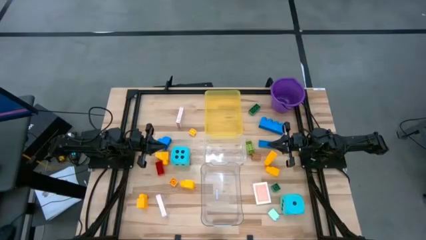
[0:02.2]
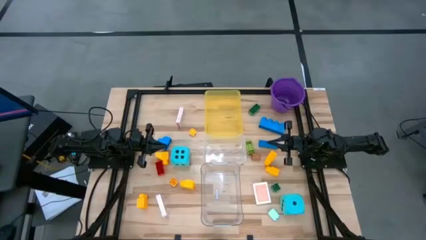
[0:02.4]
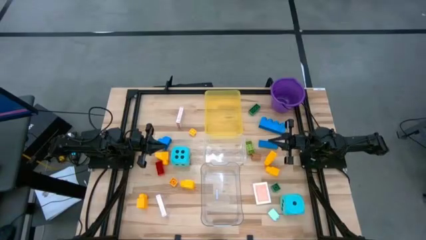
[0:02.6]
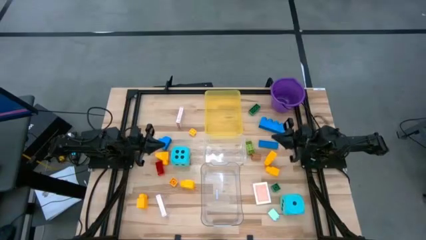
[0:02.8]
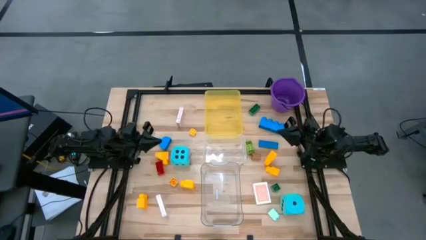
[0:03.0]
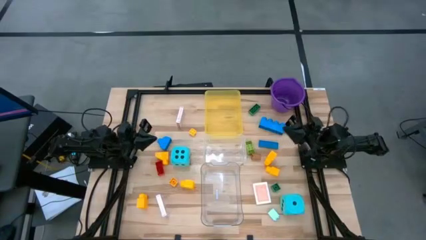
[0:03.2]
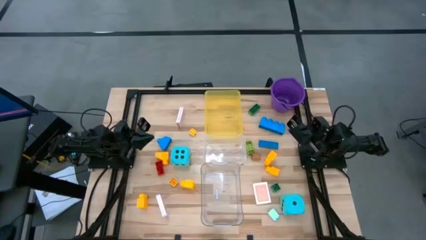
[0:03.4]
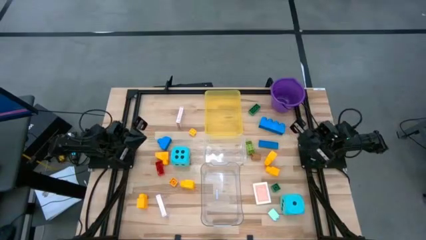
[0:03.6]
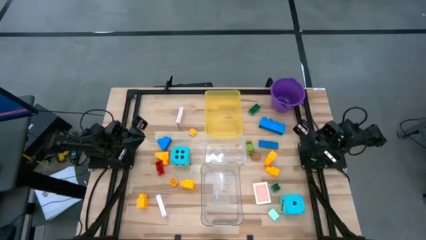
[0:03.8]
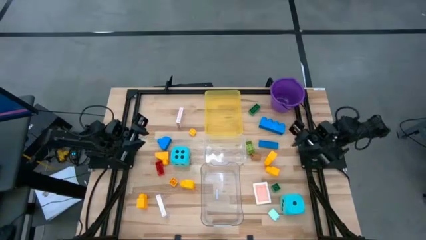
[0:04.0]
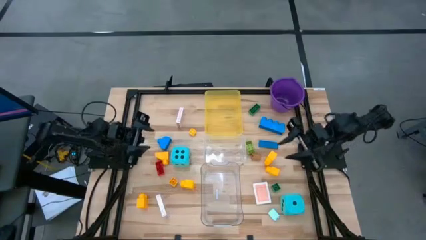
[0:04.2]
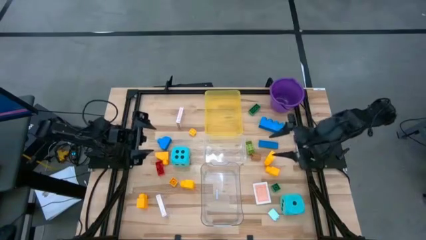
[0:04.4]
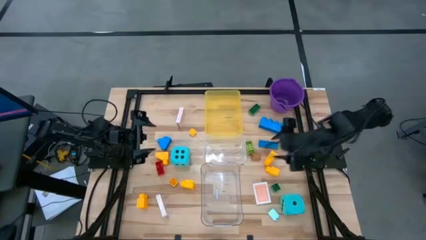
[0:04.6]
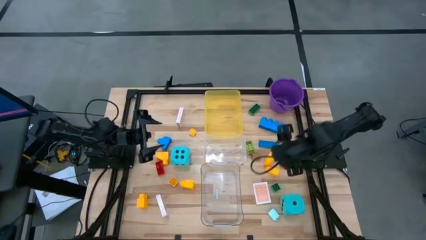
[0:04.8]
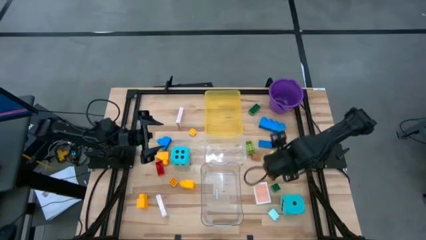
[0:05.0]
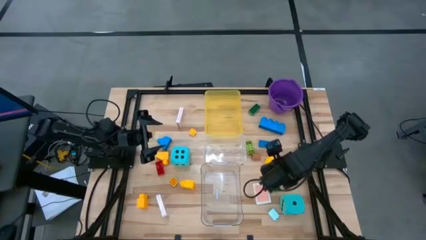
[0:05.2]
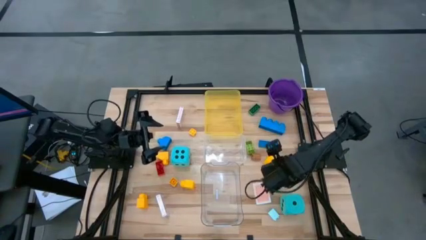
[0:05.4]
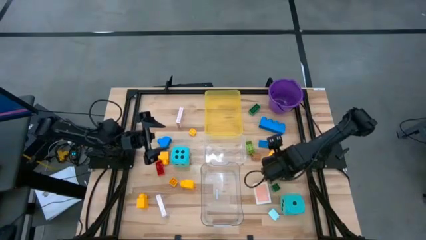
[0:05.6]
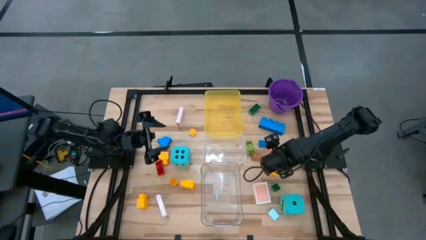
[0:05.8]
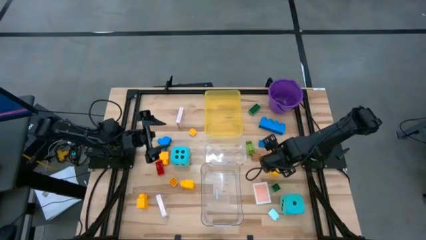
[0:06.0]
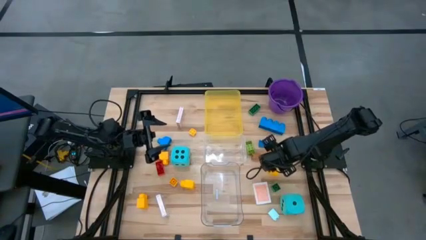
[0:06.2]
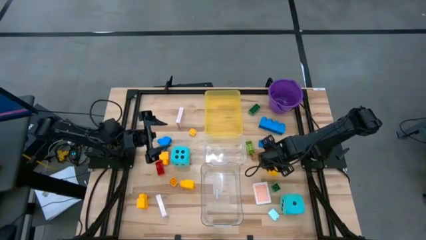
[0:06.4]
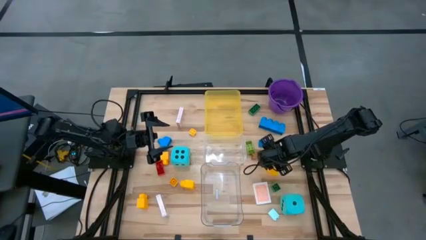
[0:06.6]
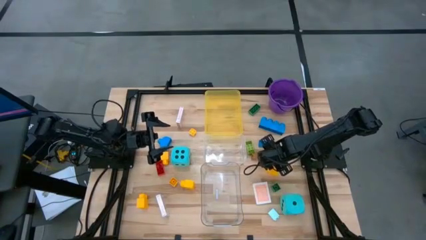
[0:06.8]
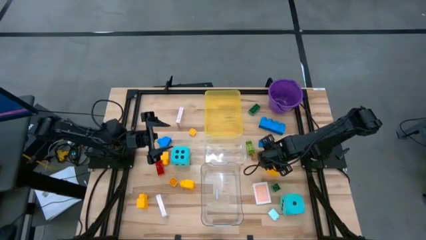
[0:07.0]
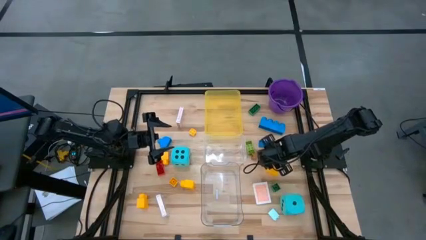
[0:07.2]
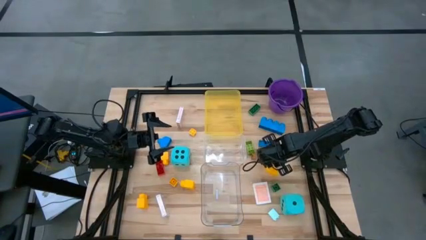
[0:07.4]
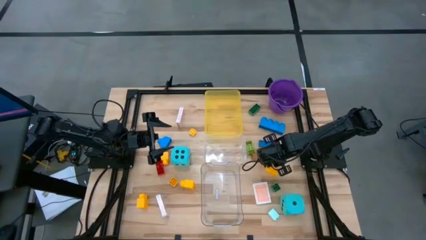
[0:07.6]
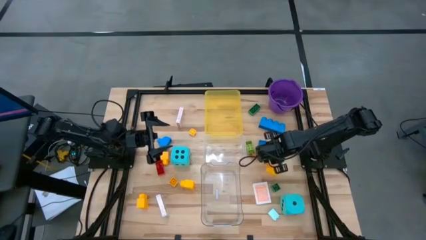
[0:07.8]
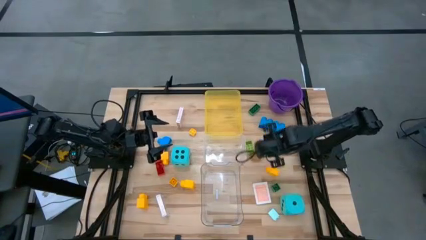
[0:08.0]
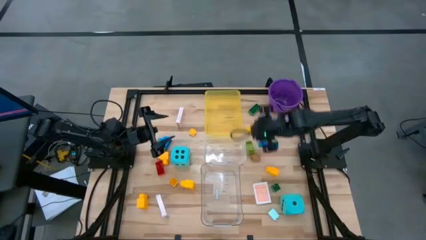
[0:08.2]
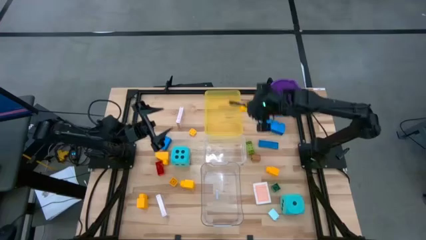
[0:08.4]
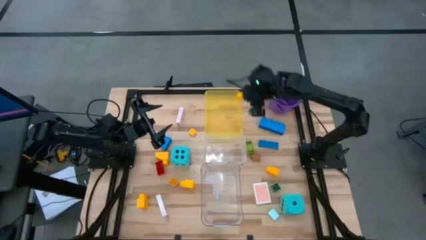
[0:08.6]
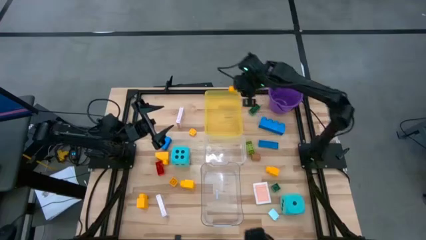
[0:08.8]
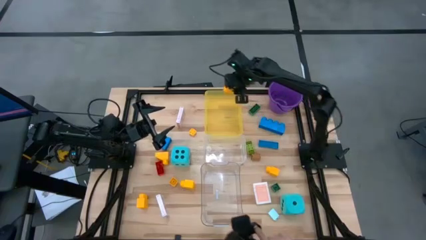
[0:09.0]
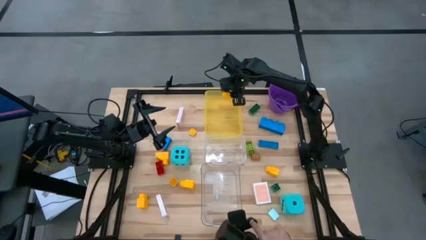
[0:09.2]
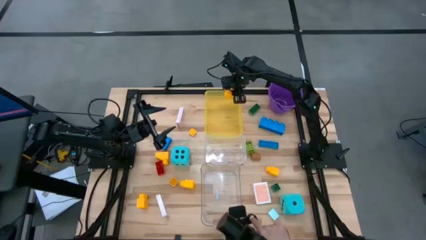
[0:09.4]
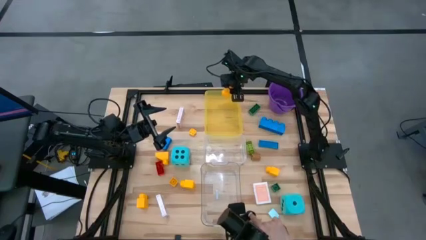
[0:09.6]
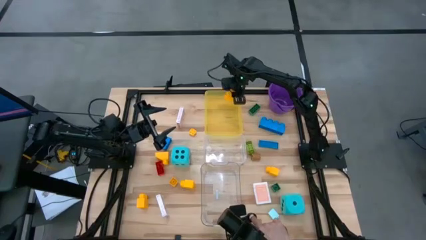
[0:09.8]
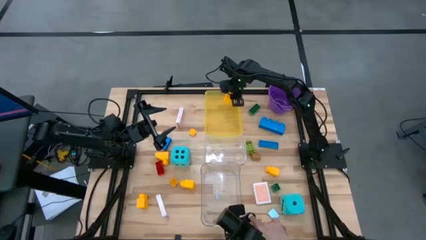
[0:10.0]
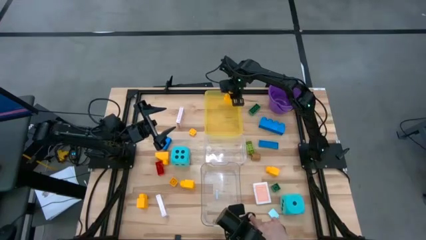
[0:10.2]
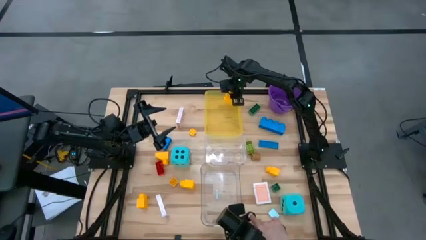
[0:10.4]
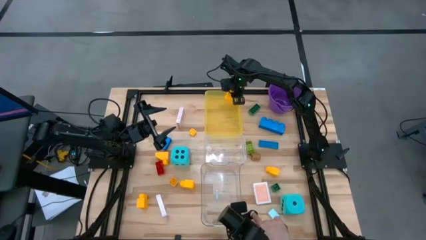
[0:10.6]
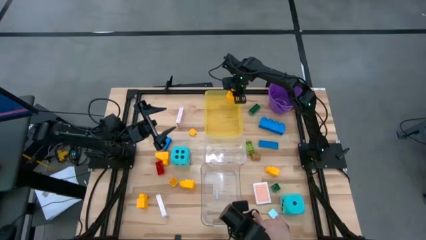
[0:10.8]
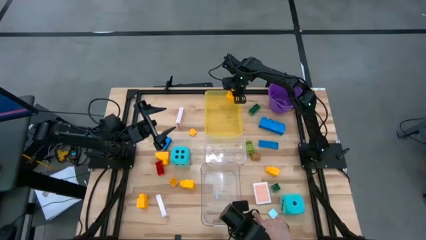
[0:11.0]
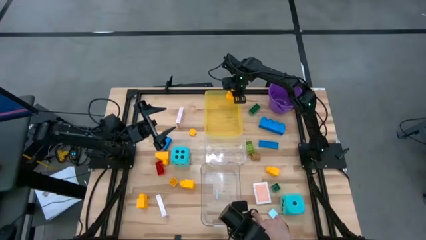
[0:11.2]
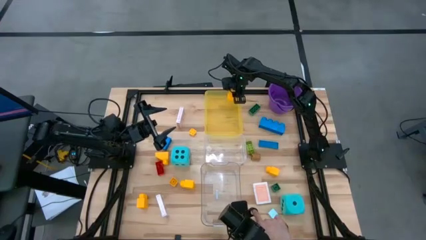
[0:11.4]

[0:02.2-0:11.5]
Task: Pick & Place Toys
Put the yellow game piece into the yellow bin

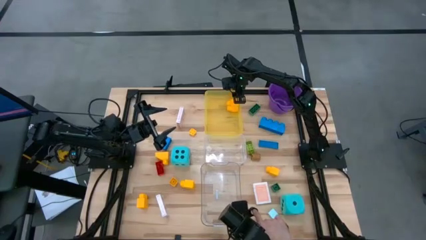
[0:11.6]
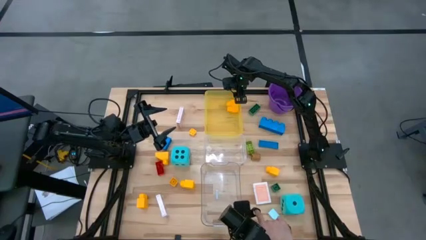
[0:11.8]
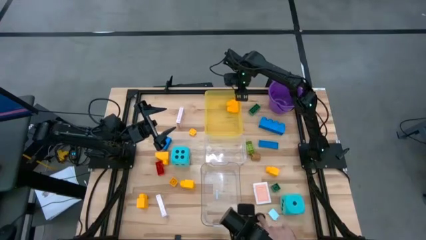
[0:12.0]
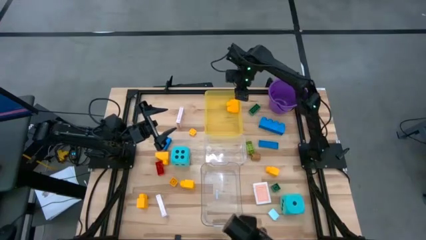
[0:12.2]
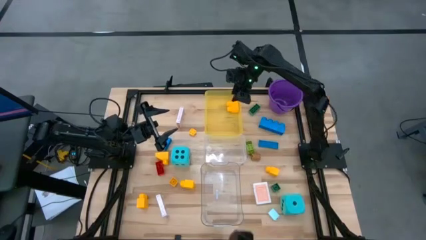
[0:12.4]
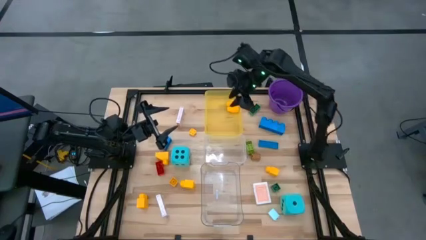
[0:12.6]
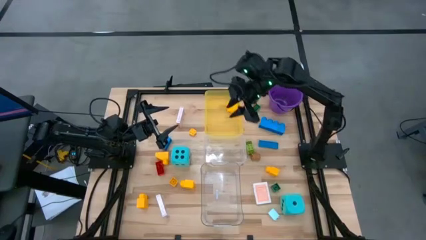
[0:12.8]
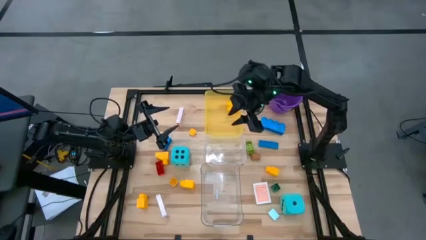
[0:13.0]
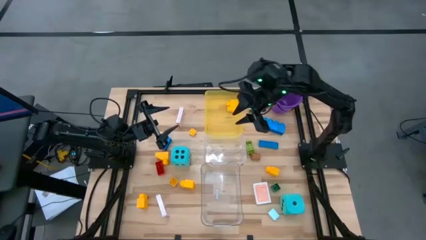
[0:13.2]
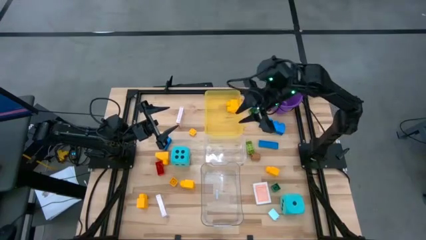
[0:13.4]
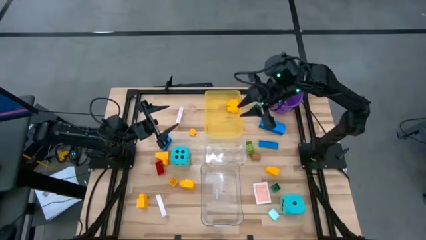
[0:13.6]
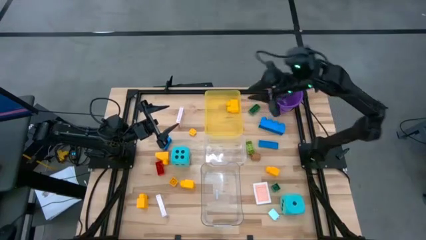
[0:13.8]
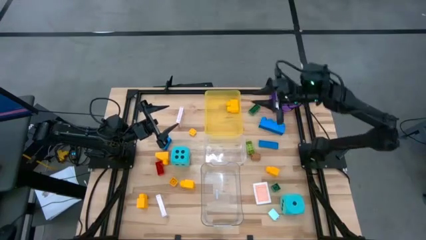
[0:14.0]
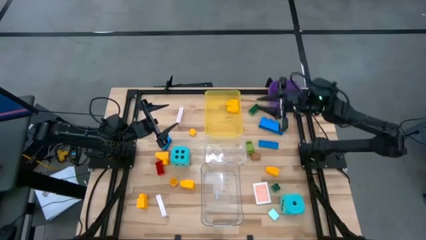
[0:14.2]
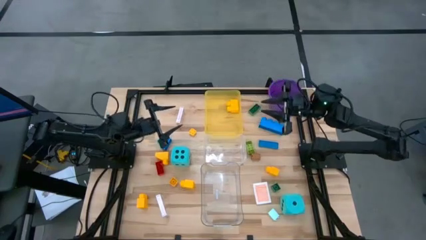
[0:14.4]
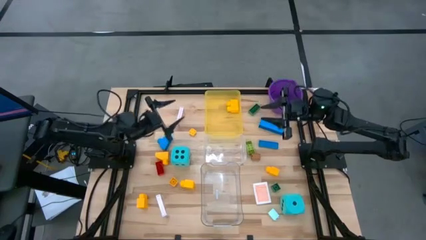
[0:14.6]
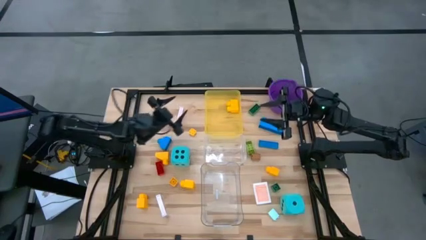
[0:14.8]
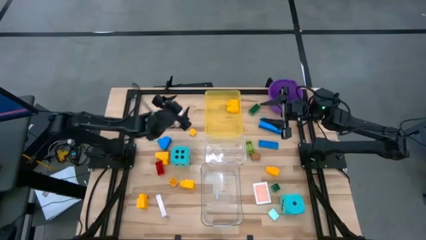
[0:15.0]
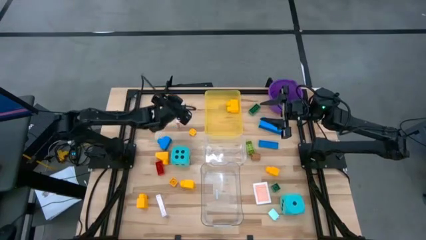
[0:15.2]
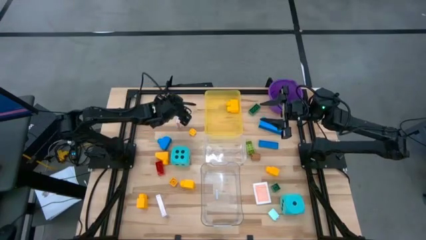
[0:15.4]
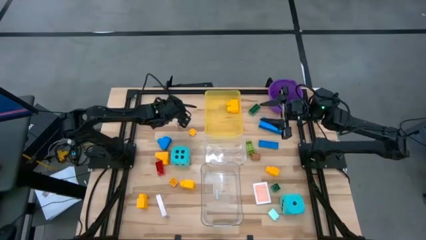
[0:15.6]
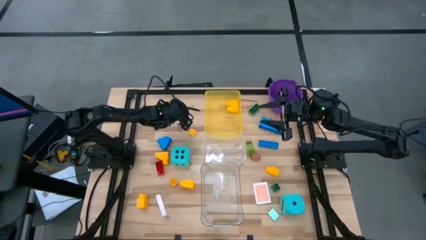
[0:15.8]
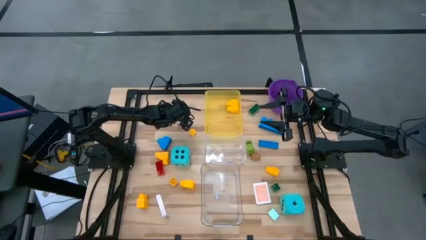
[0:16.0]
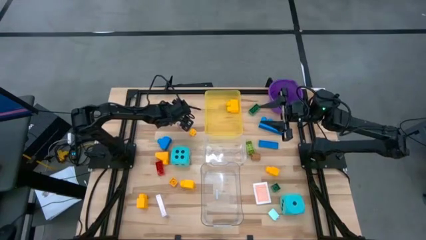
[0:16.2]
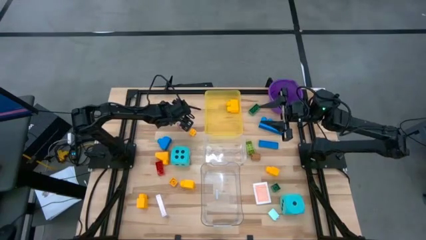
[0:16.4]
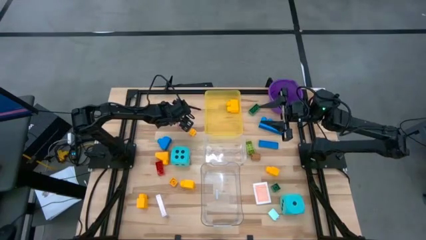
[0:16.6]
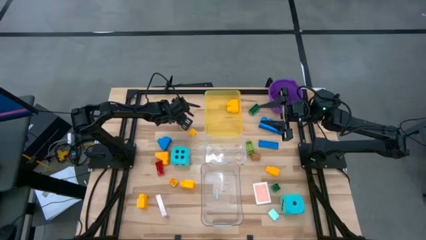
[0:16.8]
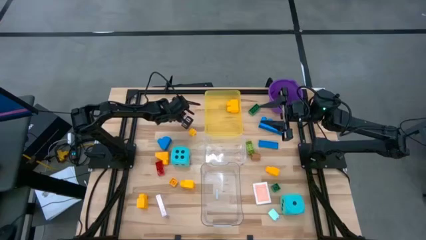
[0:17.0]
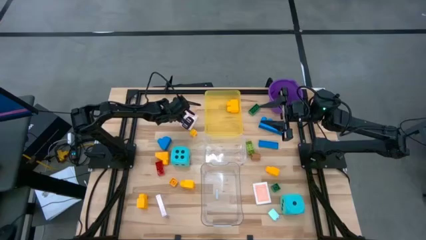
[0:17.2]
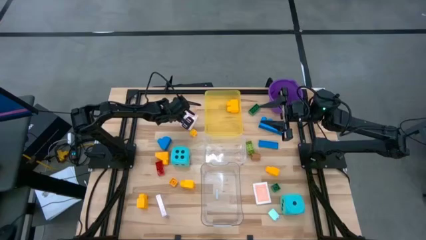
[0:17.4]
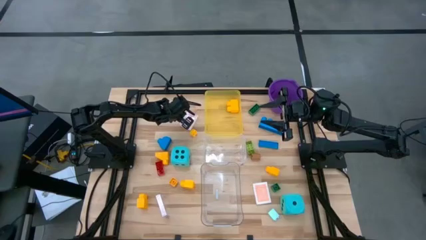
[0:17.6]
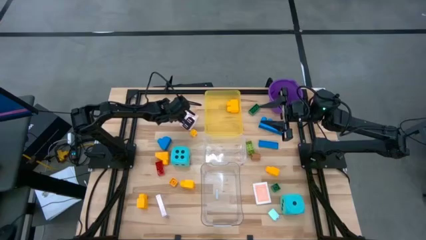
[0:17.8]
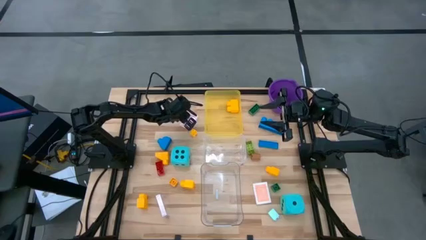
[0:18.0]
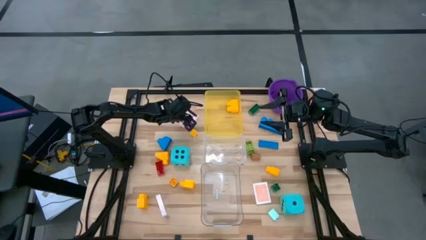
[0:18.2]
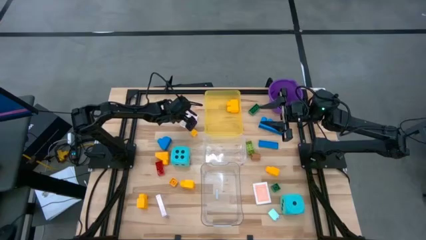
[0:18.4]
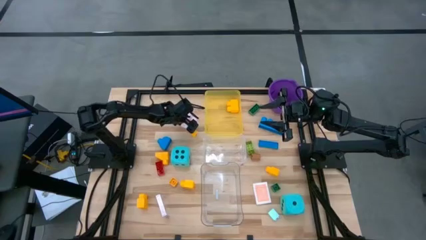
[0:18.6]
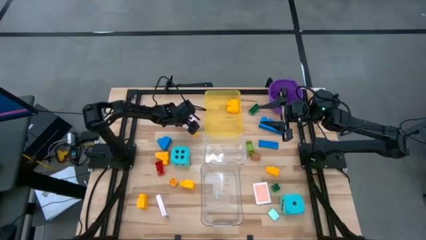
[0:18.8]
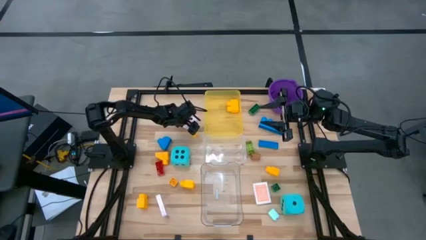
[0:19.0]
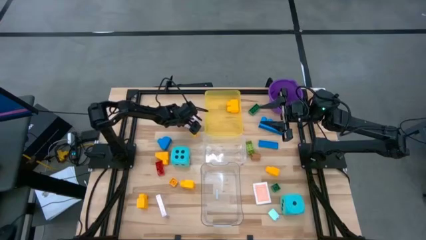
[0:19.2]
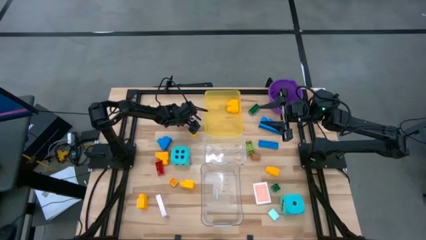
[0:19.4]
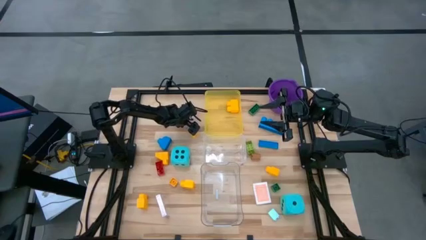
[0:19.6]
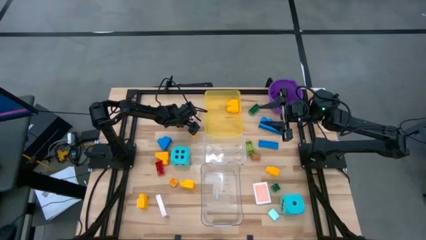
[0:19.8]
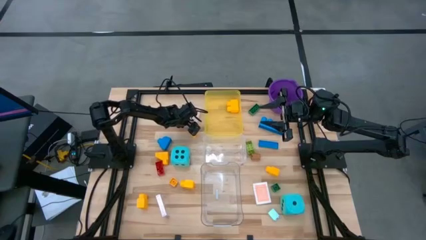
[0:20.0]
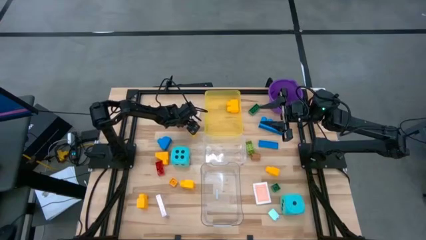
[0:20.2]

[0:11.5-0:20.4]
Put the red deck of cards into the top transparent bin
